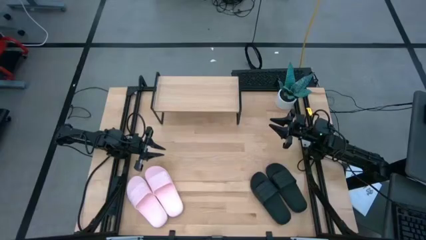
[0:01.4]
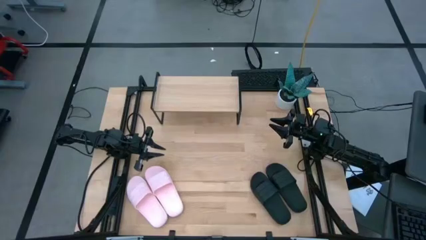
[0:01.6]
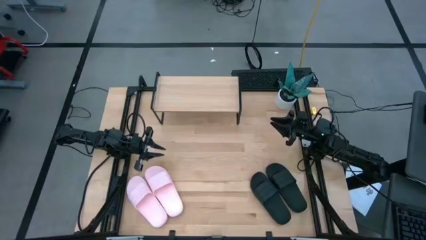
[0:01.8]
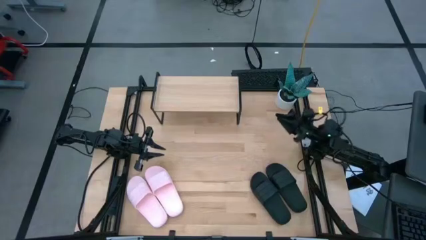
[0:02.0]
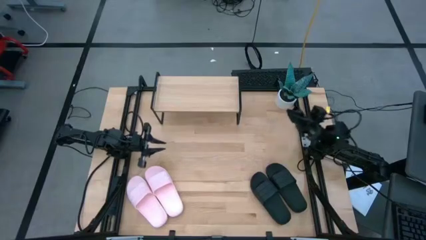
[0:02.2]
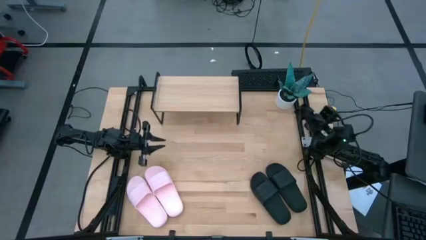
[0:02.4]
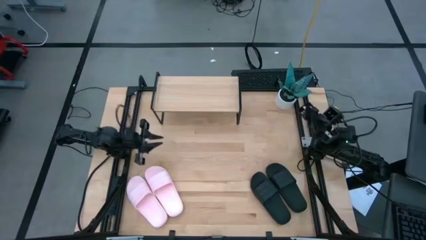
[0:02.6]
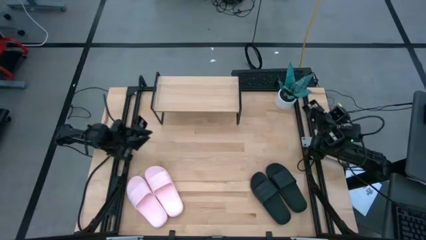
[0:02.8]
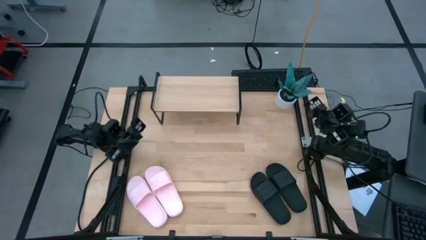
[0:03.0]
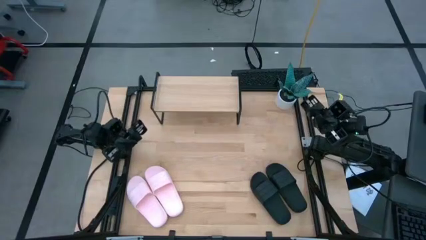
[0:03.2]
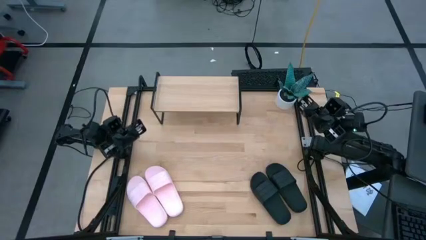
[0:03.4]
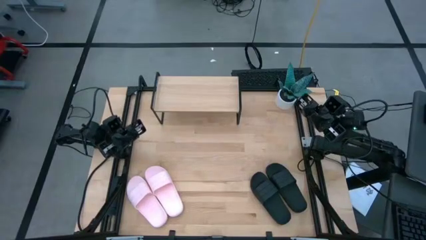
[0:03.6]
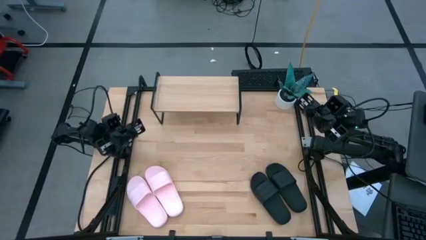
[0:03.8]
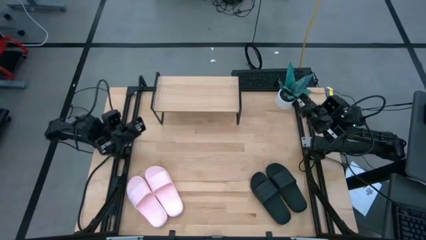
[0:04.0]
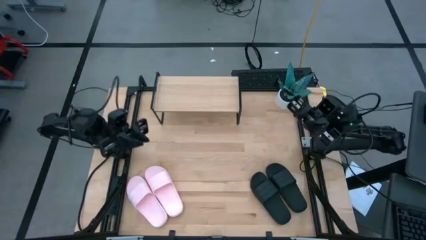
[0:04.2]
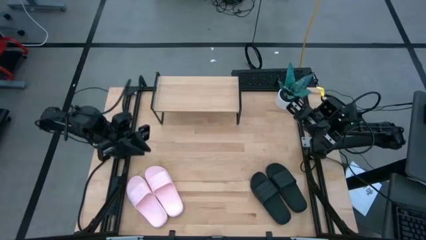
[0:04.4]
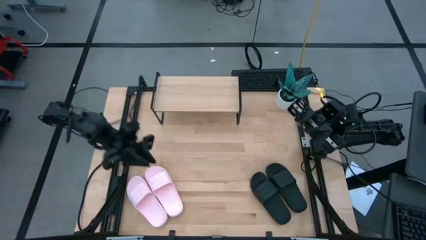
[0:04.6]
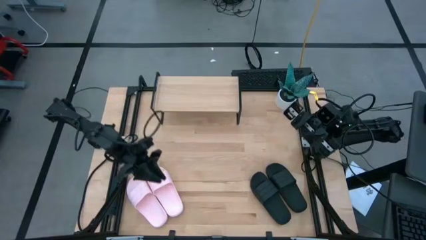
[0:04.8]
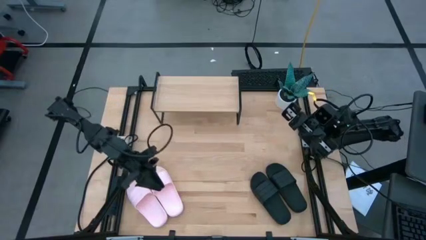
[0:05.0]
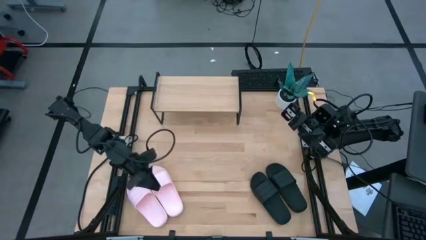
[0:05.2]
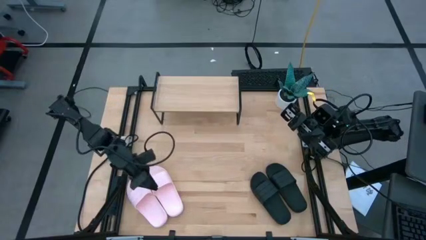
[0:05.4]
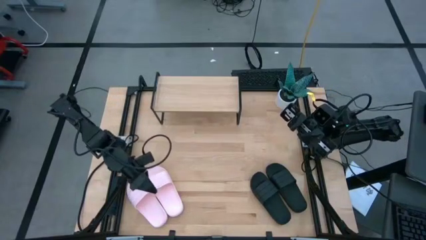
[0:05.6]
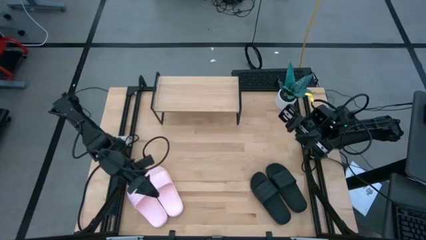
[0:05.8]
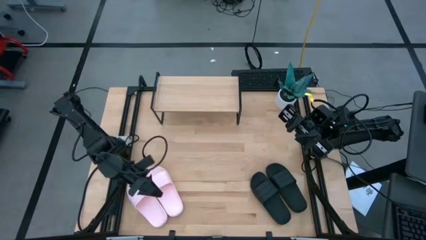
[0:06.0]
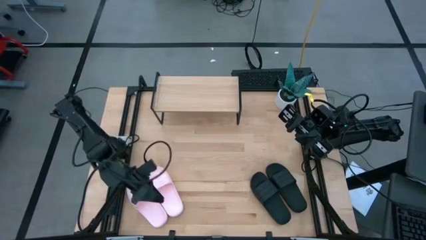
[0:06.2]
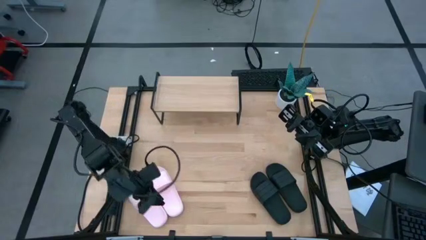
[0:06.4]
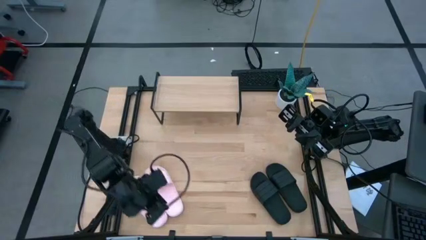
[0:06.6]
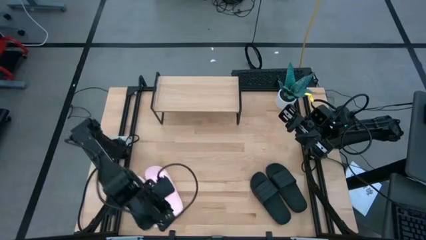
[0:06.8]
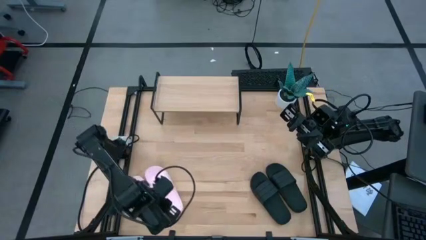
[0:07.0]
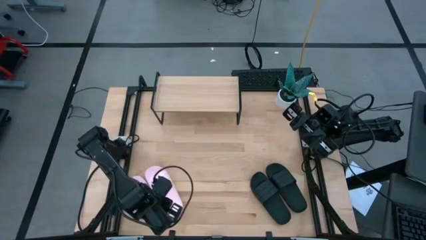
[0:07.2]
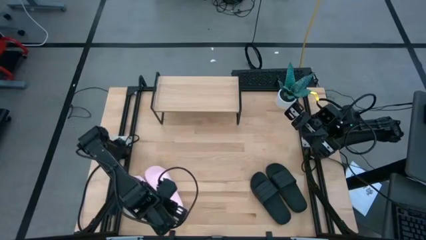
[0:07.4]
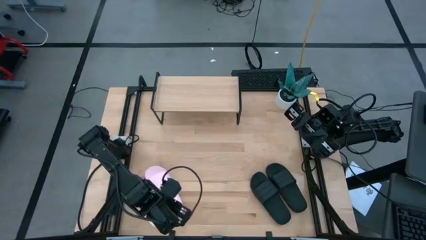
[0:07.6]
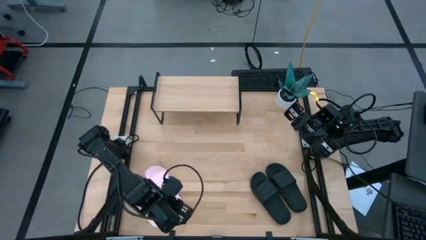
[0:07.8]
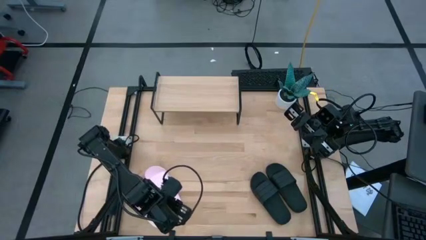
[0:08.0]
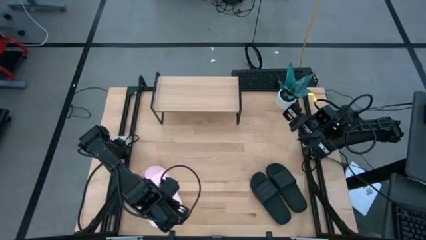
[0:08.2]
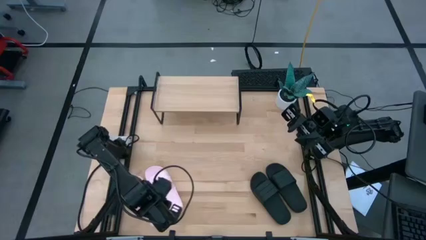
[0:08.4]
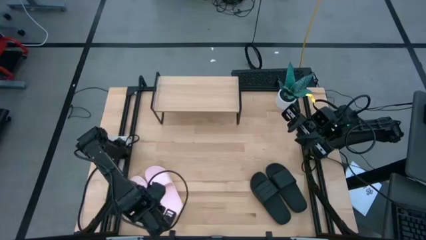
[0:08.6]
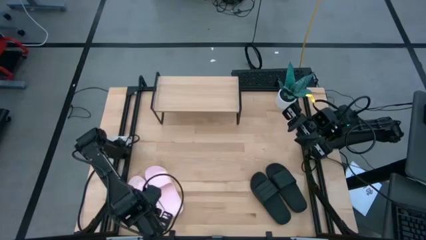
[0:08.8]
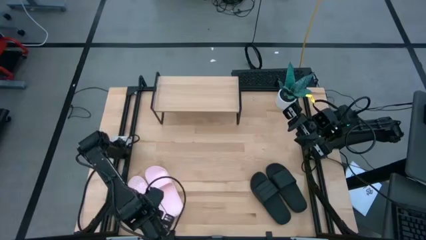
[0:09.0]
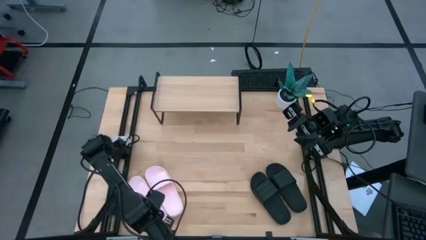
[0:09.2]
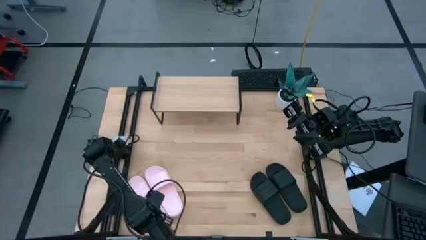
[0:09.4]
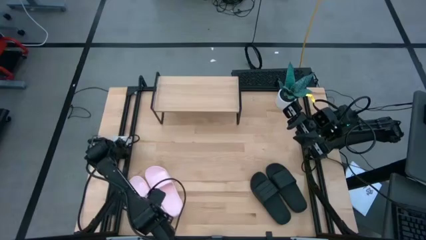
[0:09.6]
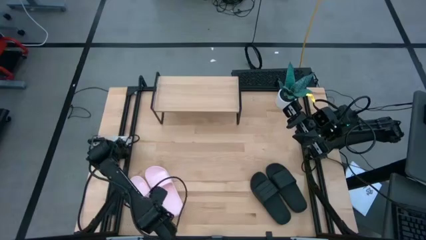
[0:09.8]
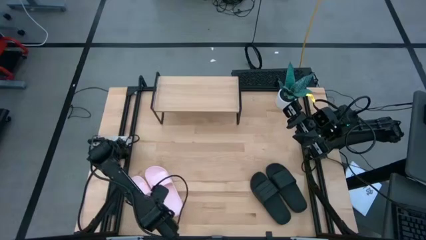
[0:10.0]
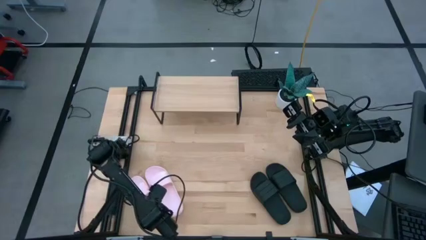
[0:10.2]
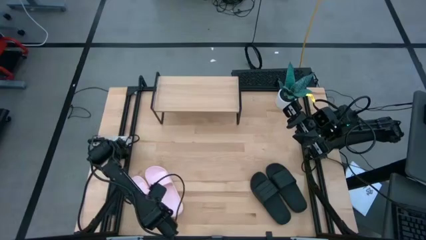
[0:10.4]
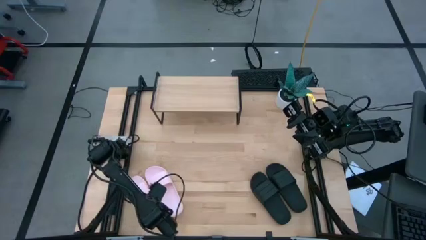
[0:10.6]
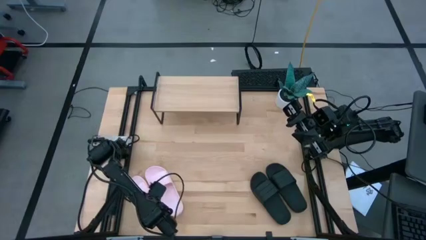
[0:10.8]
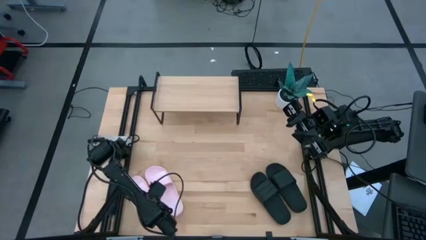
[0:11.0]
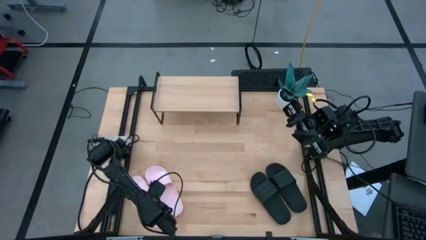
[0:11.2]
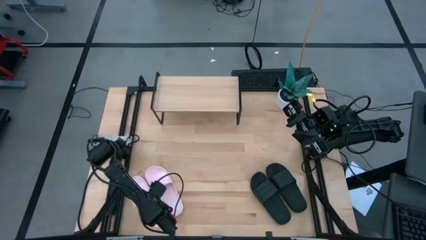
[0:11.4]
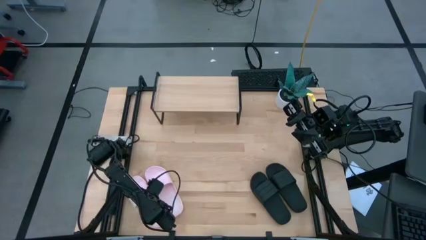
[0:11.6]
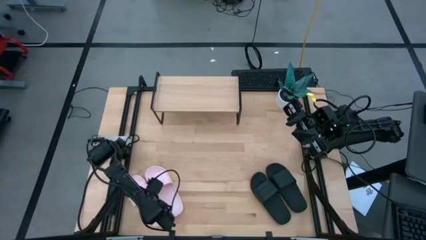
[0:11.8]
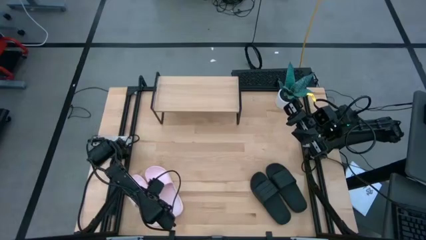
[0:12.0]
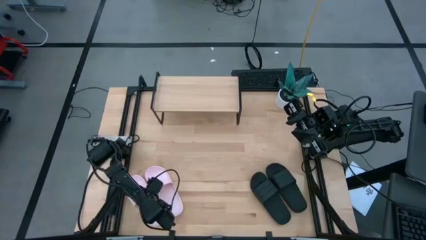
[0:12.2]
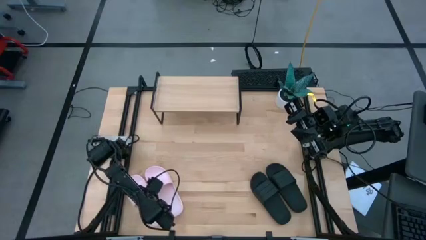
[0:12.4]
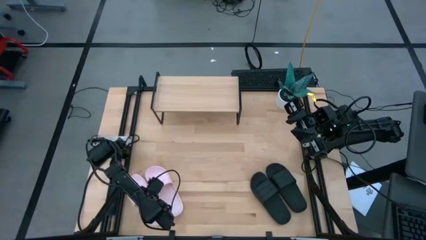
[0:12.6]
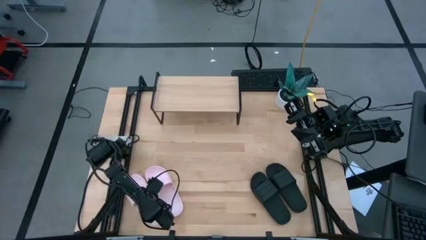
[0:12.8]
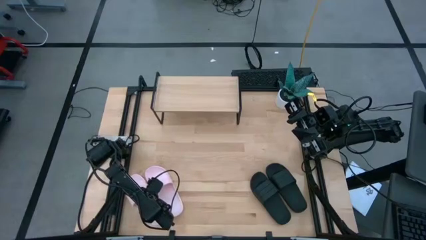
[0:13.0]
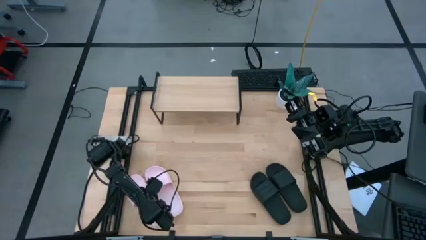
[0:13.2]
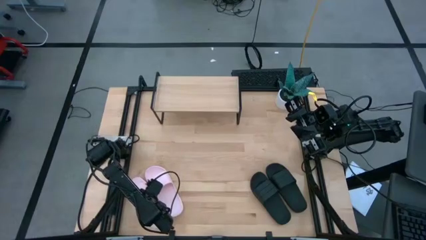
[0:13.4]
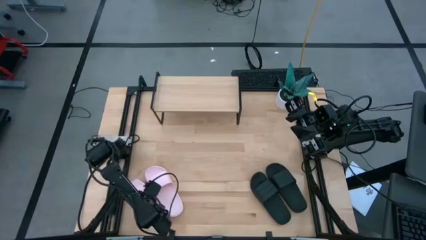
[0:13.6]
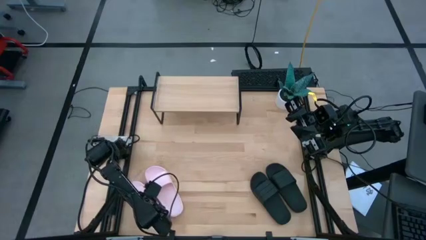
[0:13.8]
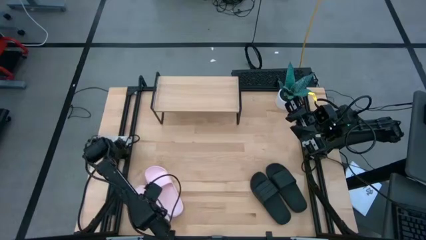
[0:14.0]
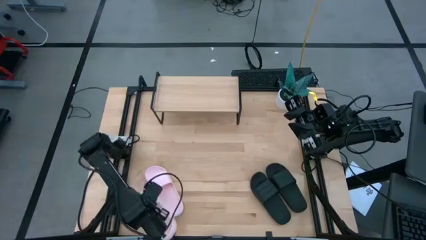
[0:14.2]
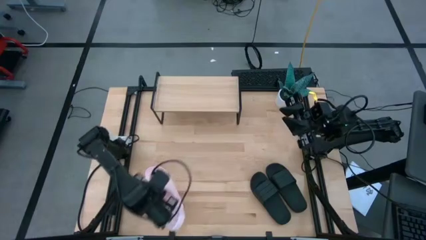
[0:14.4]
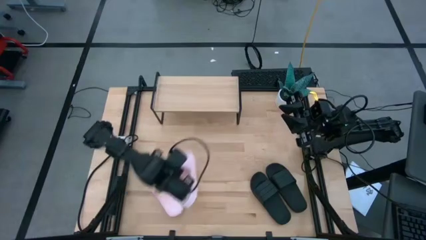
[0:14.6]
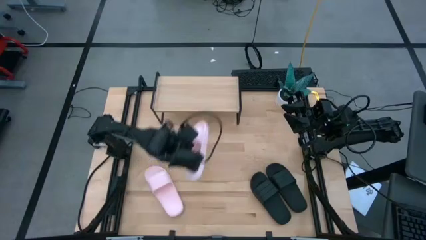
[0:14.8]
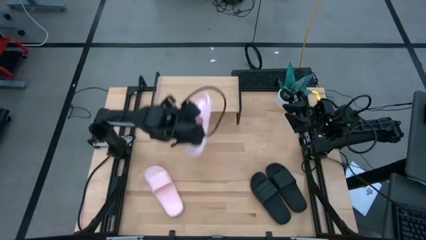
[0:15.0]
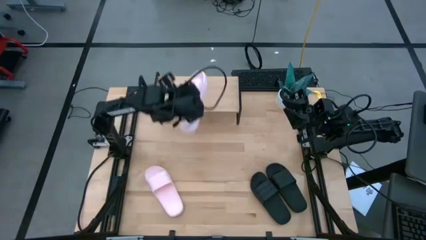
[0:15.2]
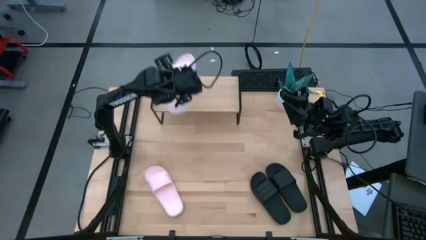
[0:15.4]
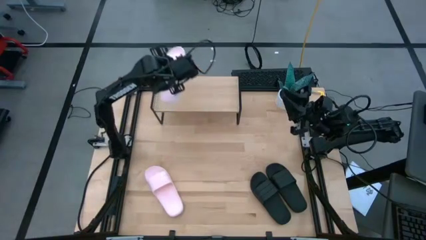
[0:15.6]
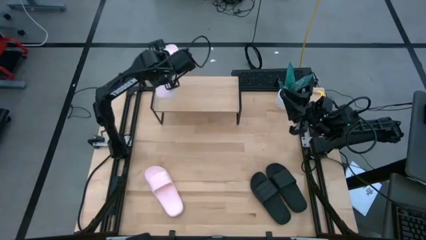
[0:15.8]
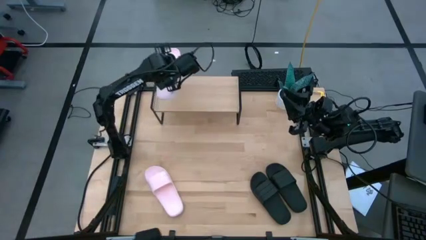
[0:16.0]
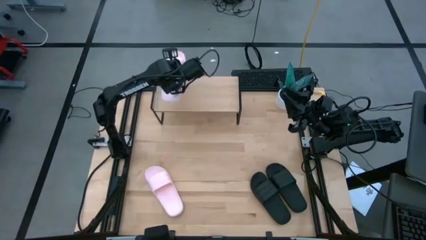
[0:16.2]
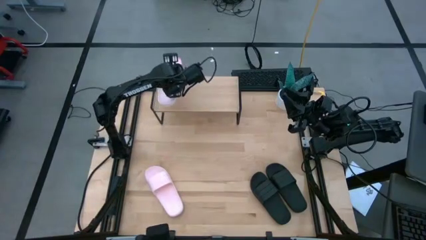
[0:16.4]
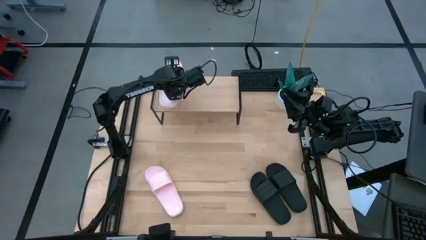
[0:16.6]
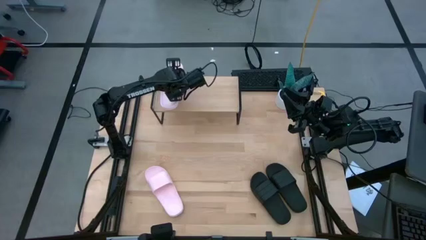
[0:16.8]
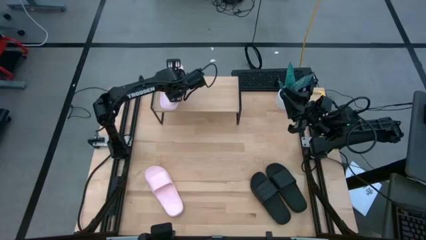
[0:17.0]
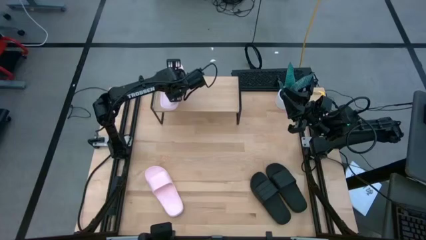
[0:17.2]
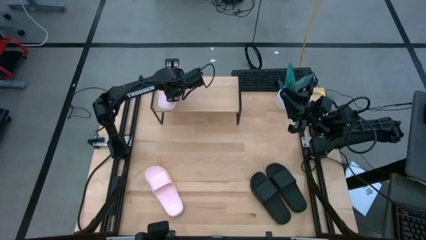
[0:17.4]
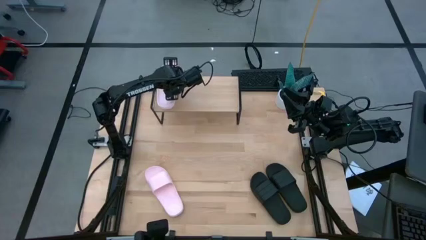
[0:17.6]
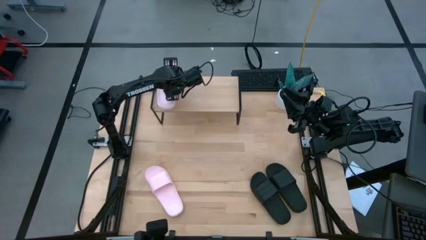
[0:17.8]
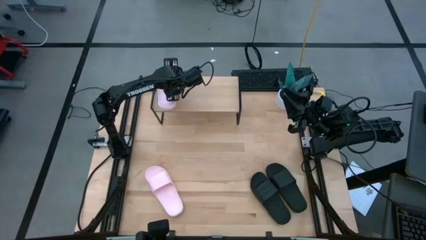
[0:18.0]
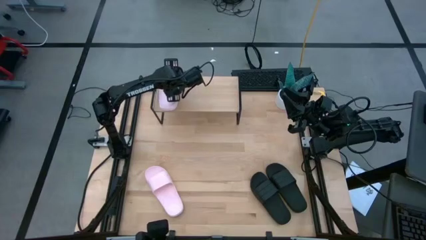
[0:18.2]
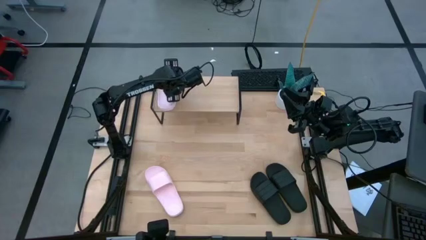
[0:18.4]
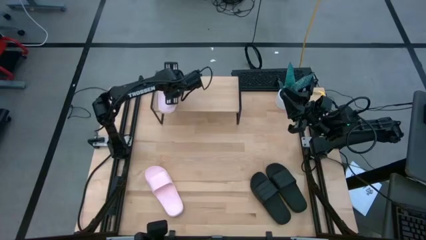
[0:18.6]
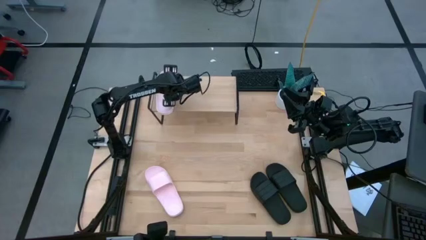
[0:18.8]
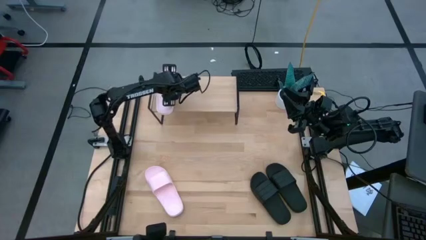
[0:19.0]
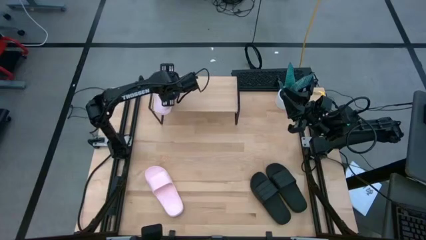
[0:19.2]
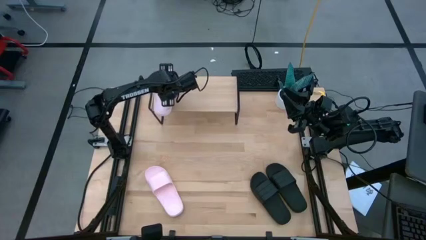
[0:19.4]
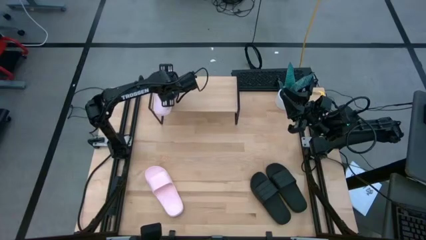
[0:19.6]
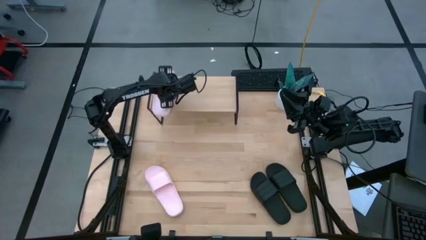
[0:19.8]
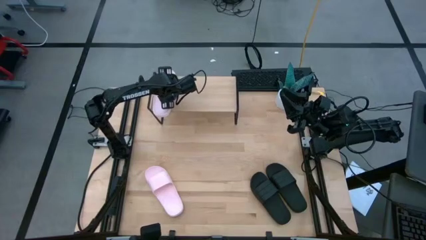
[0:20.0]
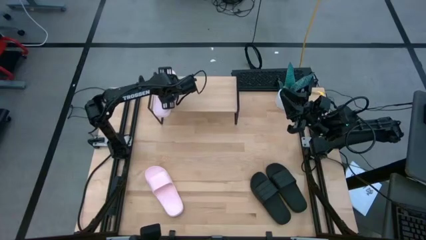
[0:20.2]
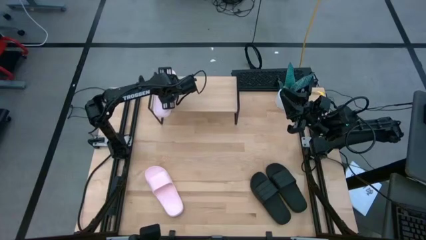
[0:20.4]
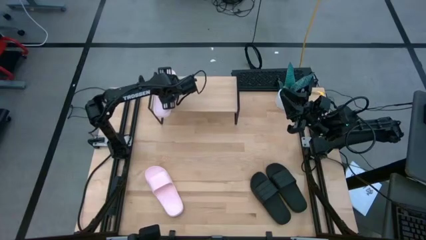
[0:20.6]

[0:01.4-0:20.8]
Task: Pick and place slides into the shelf
Put the left pink slipper on the shelf
